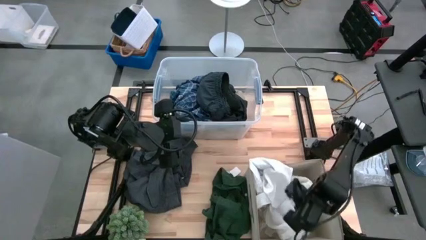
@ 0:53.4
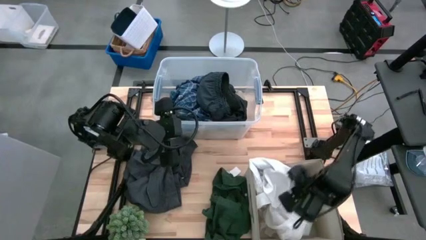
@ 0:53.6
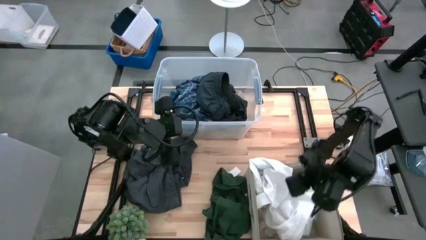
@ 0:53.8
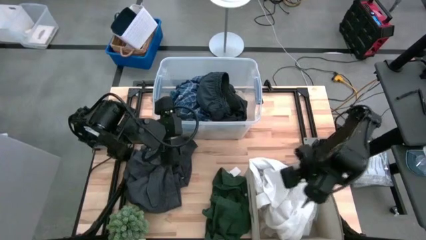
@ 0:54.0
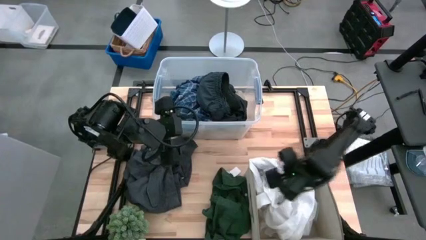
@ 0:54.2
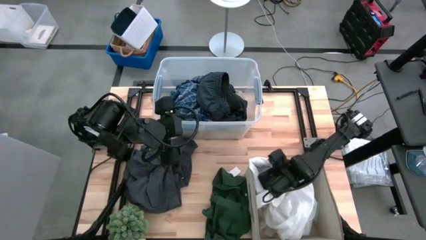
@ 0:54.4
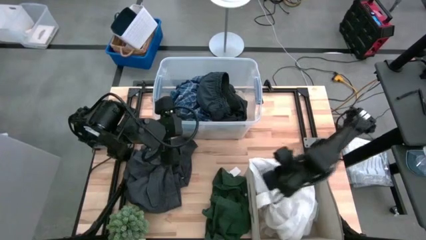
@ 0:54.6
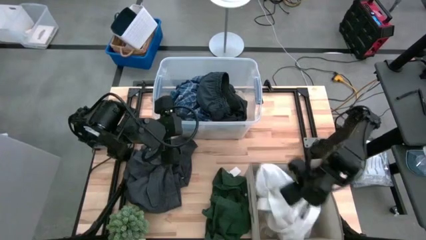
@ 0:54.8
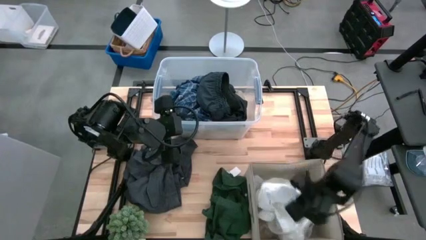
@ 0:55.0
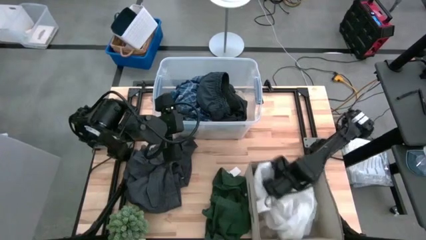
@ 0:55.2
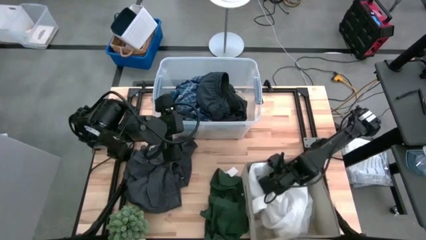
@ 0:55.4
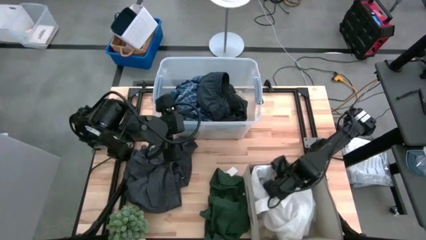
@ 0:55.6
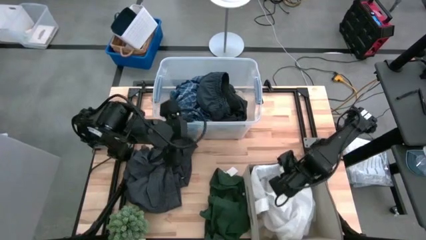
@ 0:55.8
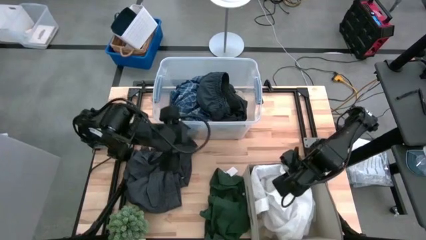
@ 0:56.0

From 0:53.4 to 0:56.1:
Task: Sort clothes
Put the white long sleeve into the brown laundry organizer

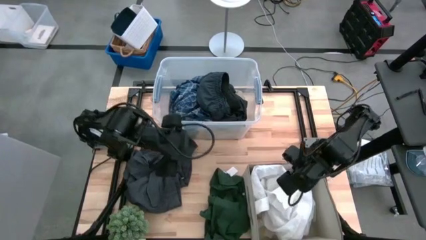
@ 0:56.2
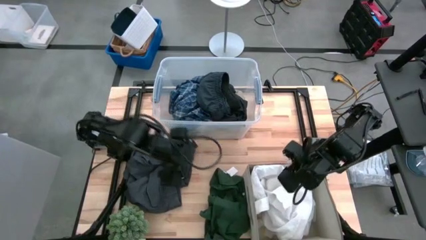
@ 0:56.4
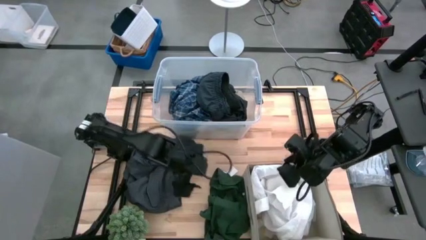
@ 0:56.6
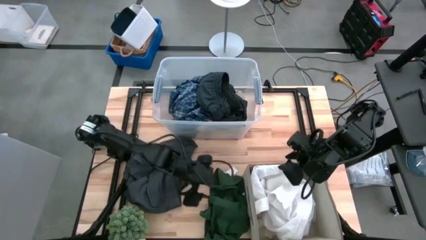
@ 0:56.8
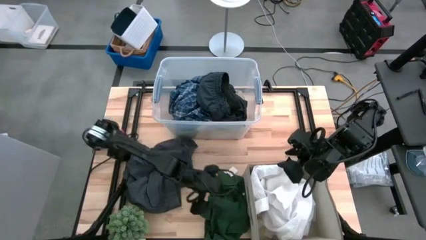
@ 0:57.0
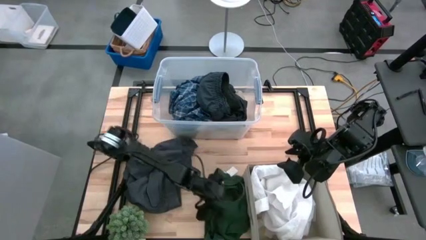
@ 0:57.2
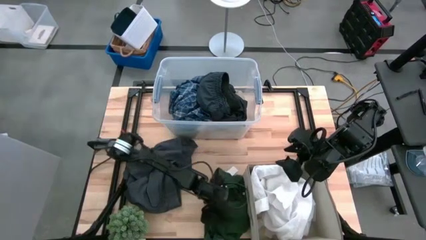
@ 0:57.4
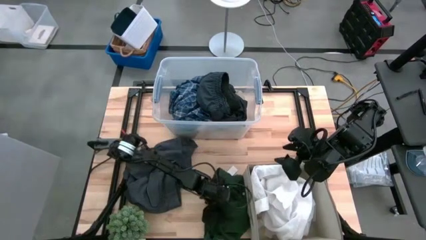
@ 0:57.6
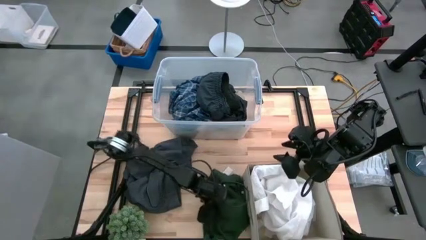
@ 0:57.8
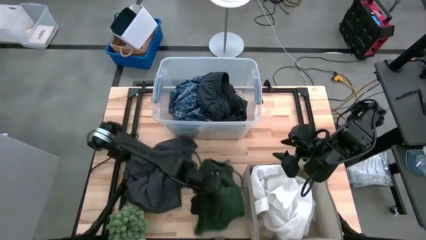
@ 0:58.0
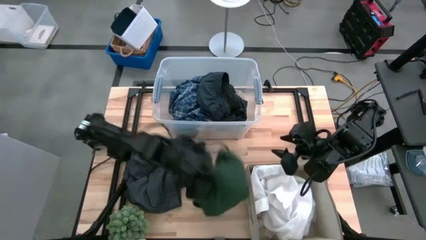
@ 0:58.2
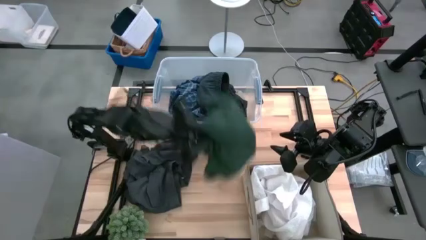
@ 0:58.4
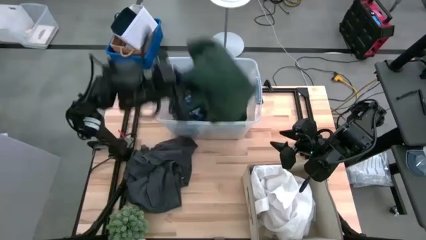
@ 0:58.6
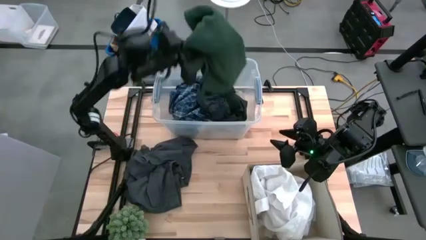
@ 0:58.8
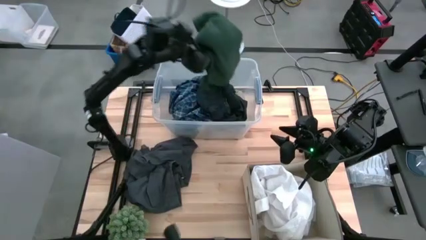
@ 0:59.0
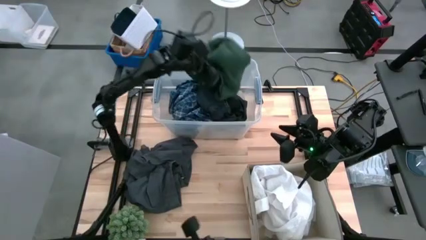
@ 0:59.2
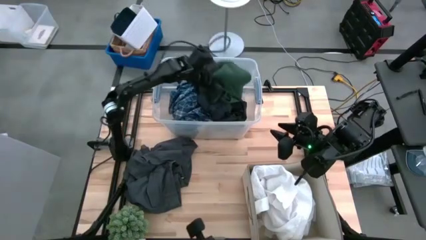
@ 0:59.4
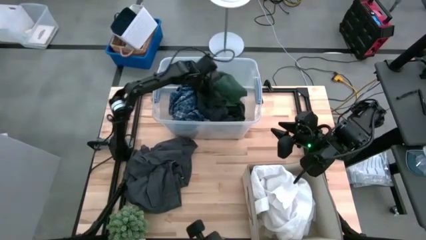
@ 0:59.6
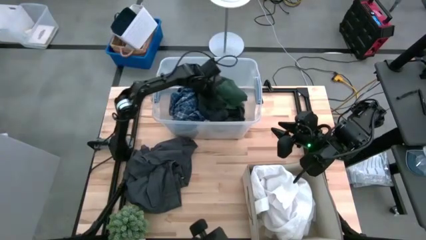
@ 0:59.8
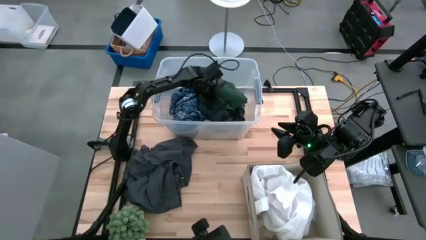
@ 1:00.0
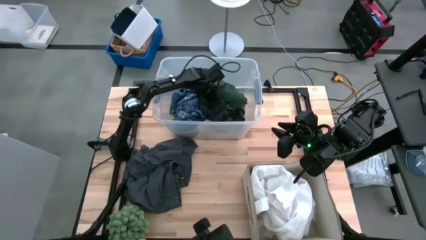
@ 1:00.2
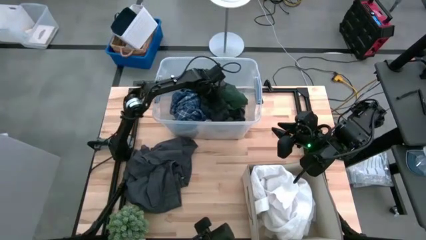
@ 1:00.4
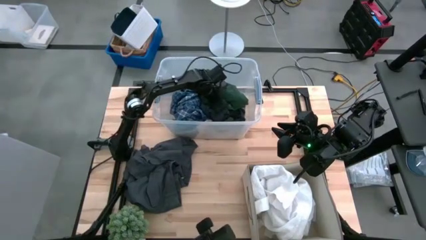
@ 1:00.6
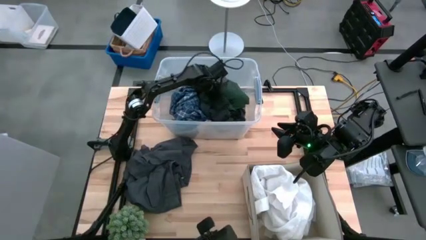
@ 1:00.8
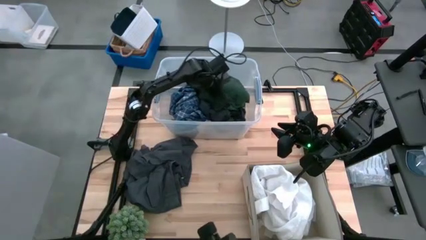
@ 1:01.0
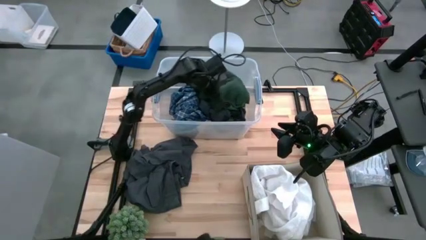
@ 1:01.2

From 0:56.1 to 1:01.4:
Put the green polo shirt into the transparent bin

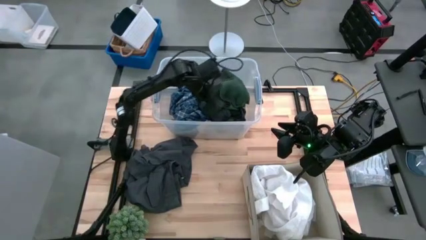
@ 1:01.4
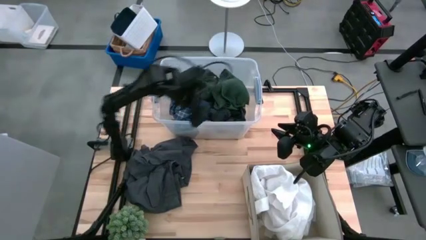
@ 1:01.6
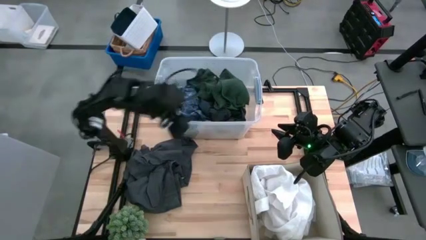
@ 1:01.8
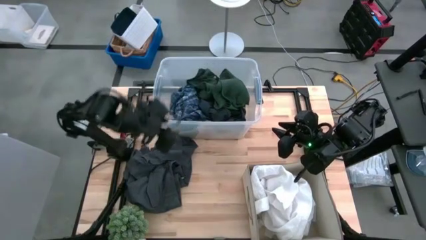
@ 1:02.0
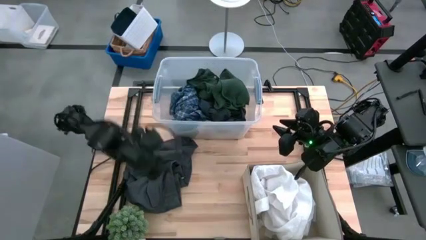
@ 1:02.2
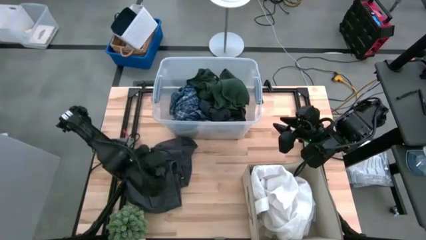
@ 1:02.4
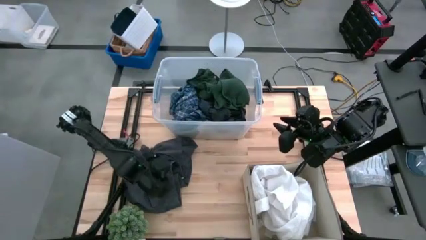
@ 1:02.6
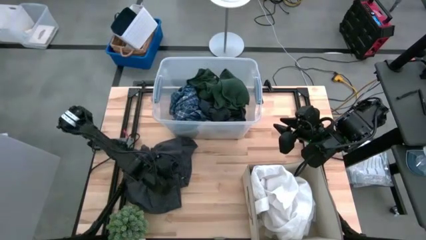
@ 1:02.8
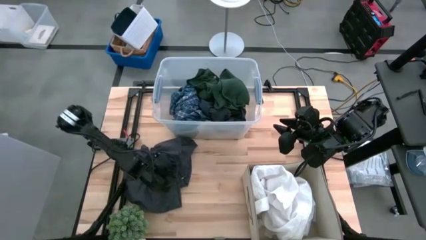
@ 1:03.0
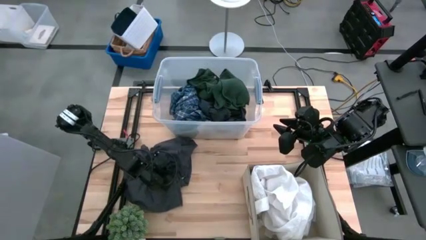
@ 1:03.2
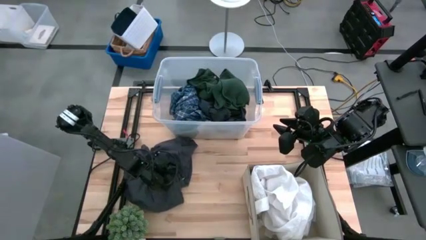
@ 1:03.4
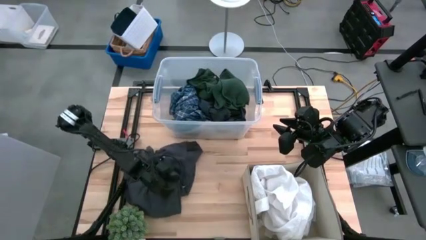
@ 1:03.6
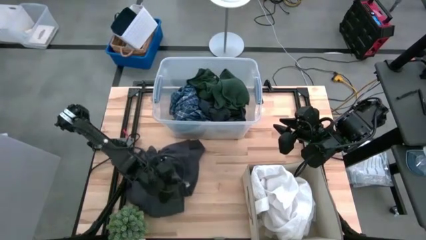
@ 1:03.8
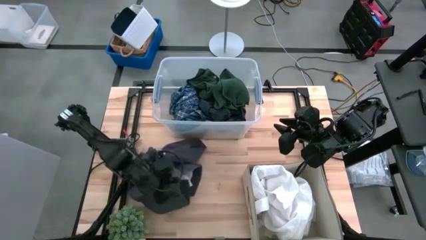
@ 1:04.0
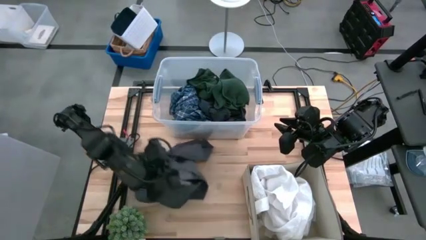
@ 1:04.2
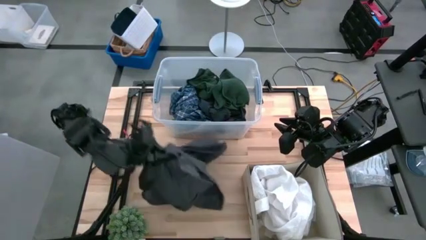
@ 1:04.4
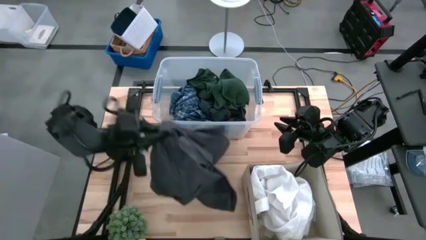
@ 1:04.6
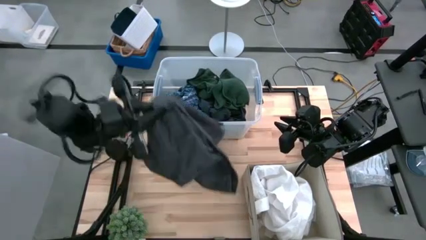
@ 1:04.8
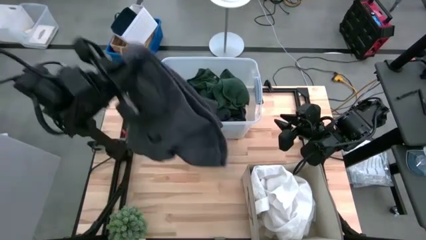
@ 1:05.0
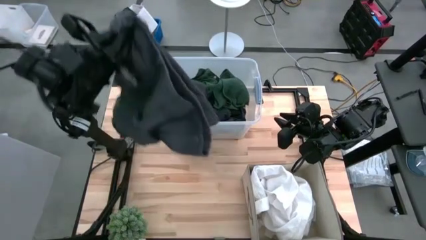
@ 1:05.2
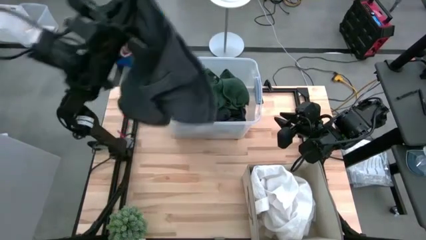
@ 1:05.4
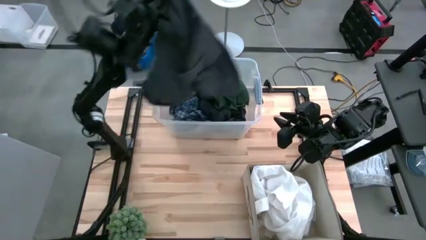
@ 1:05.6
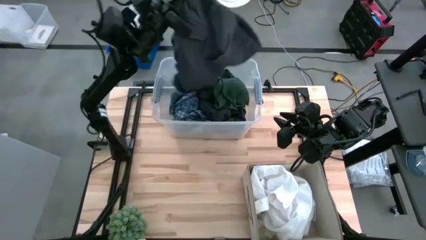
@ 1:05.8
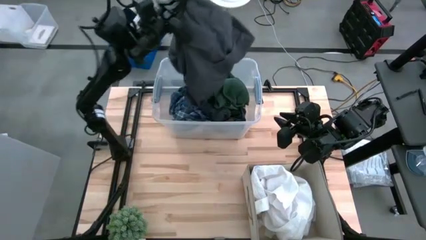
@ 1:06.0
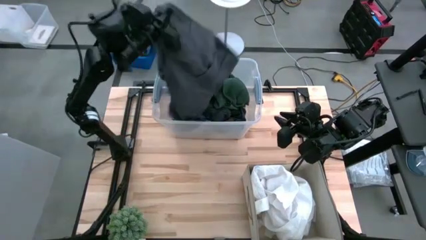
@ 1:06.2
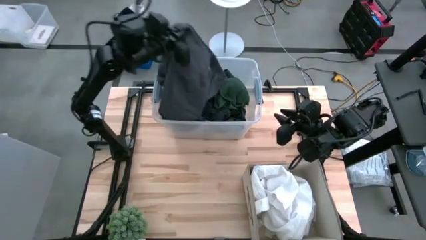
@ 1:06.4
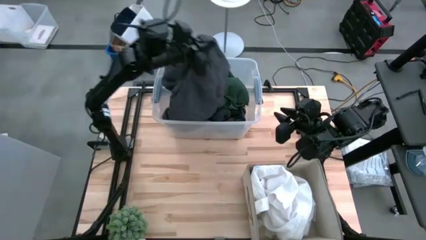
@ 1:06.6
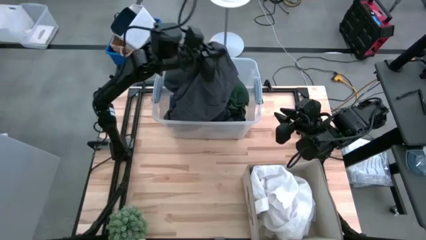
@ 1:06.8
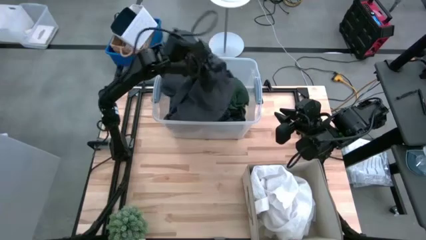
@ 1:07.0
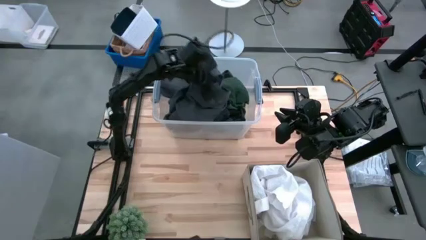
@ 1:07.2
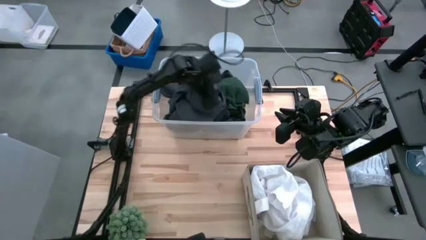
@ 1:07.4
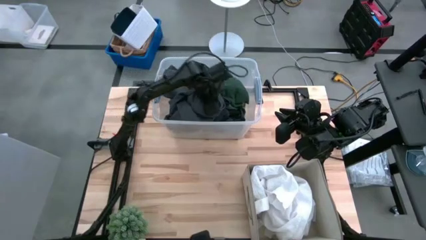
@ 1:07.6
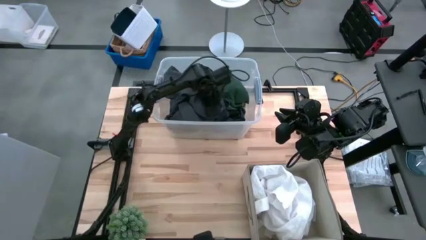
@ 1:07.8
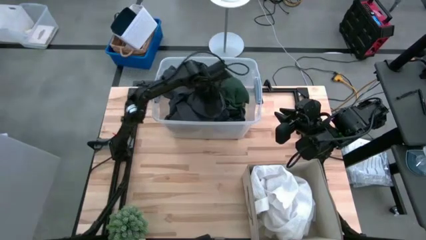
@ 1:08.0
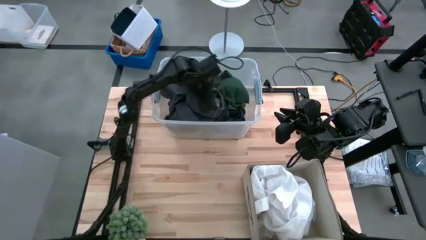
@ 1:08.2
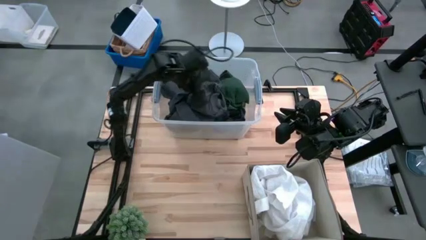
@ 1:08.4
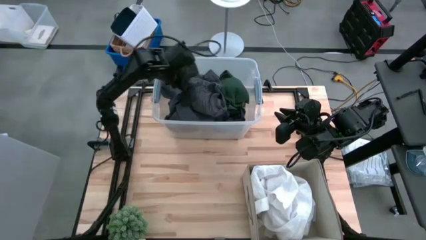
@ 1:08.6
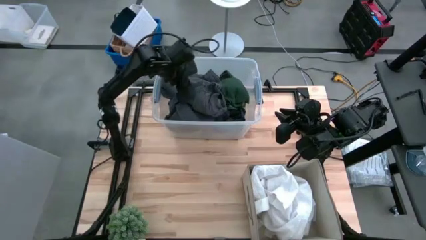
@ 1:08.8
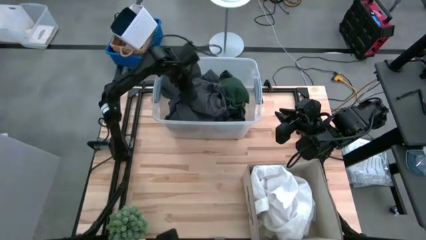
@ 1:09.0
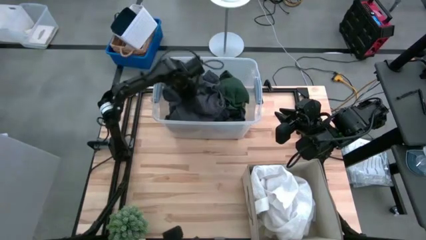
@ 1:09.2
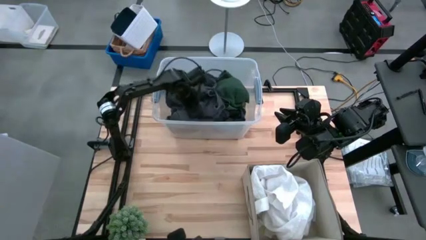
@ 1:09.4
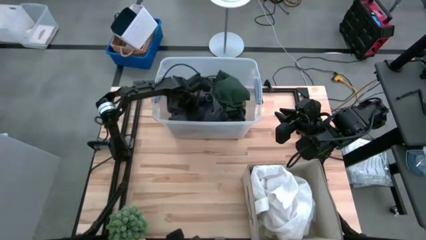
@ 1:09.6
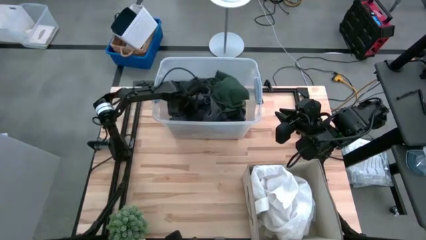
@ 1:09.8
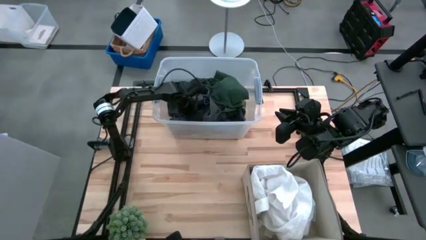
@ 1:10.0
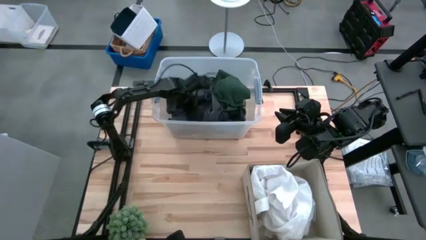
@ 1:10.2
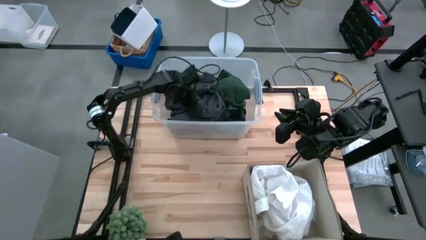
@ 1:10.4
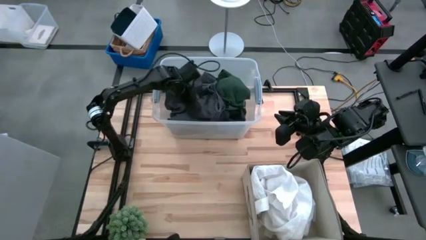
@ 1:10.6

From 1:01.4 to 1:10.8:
Put the gray short into the transparent bin

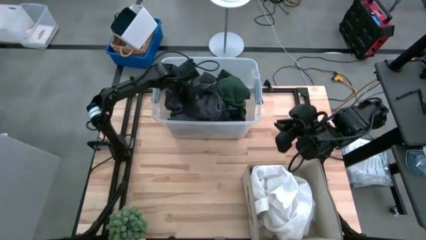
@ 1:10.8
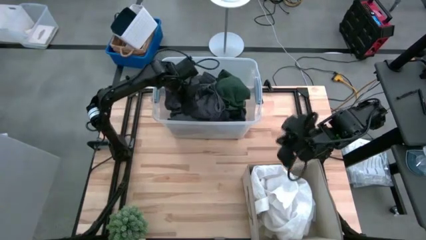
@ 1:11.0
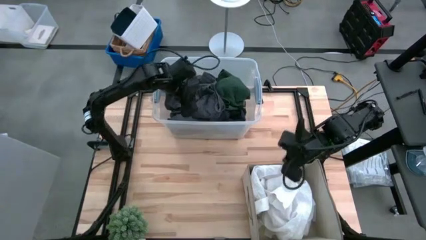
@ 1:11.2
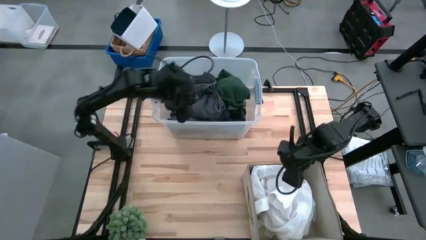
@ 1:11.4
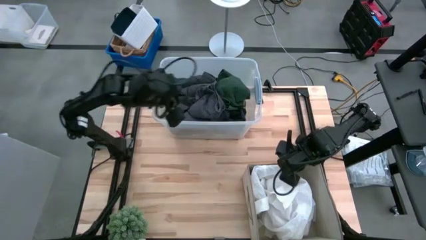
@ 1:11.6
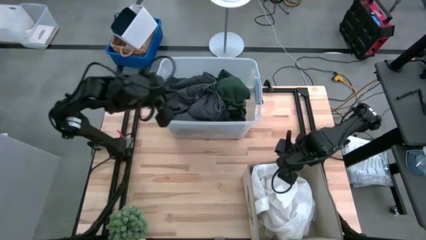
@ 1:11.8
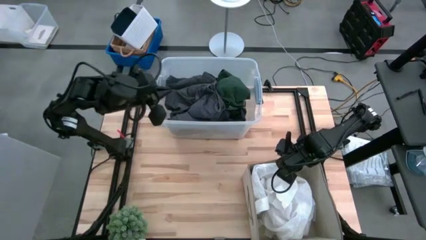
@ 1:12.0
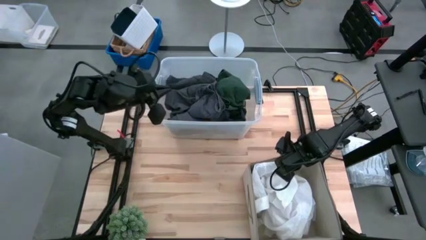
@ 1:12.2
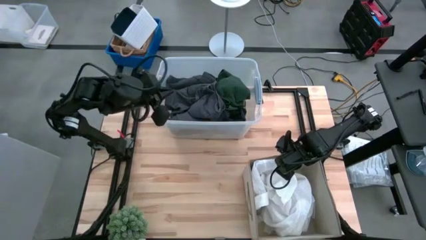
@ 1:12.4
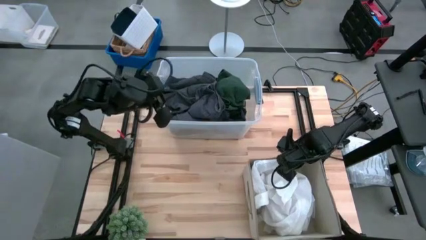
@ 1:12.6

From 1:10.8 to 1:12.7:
Adjust the brown laundry organizer
